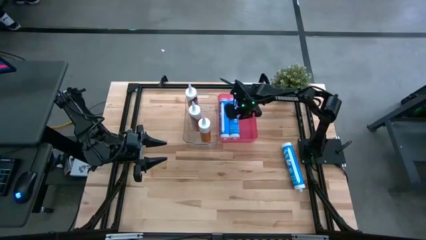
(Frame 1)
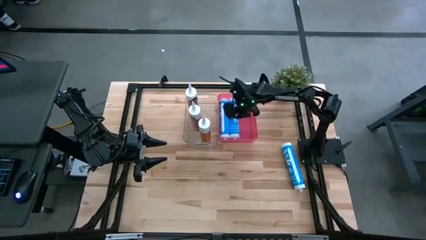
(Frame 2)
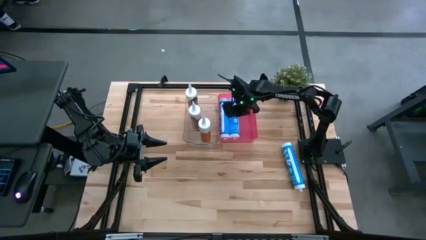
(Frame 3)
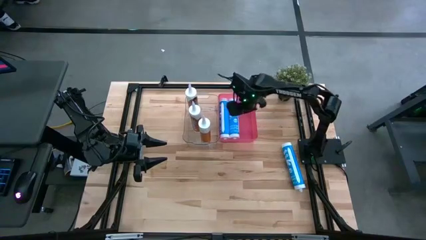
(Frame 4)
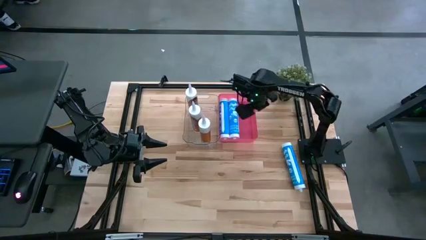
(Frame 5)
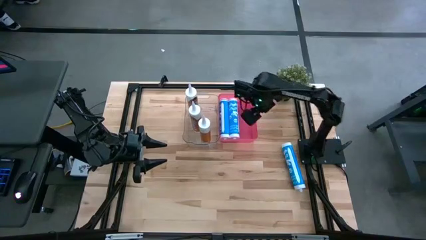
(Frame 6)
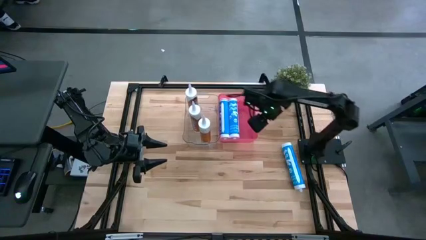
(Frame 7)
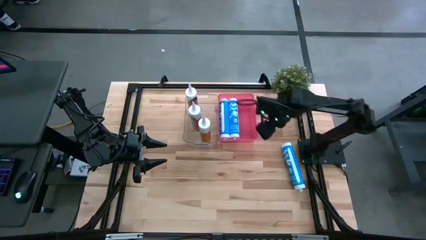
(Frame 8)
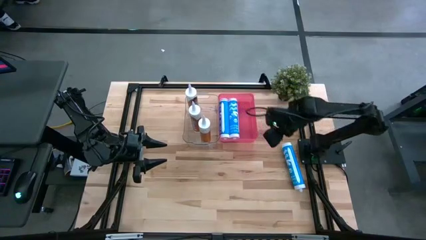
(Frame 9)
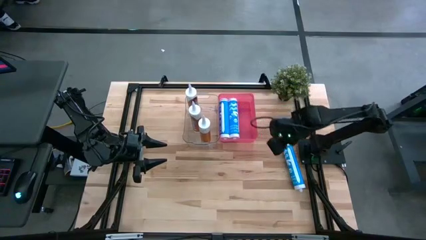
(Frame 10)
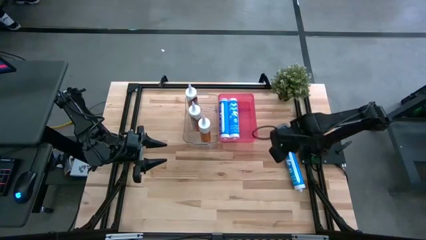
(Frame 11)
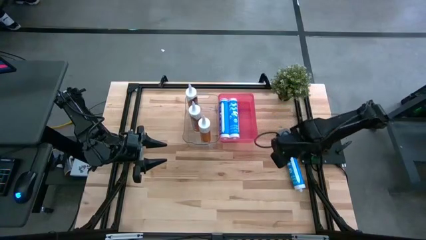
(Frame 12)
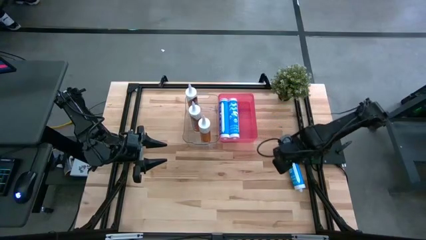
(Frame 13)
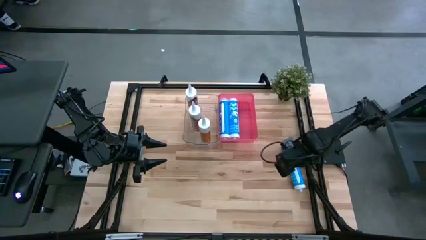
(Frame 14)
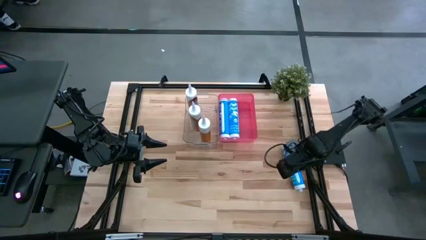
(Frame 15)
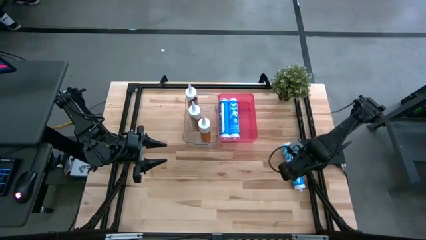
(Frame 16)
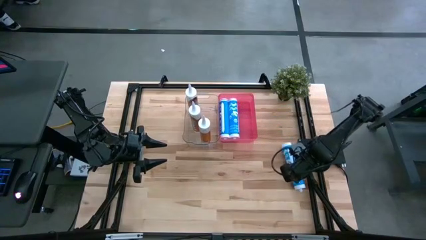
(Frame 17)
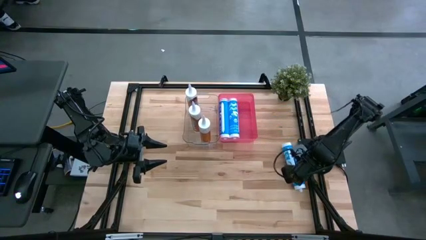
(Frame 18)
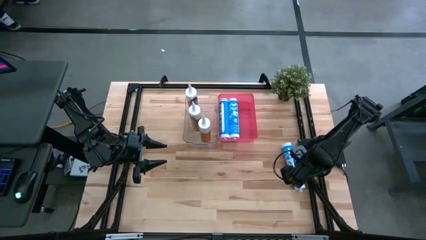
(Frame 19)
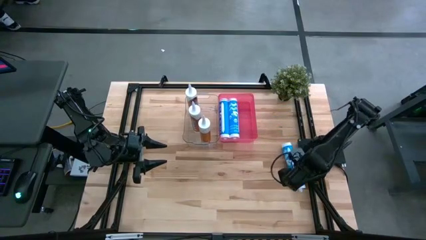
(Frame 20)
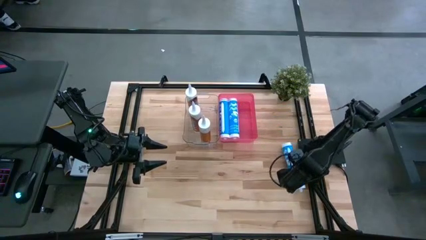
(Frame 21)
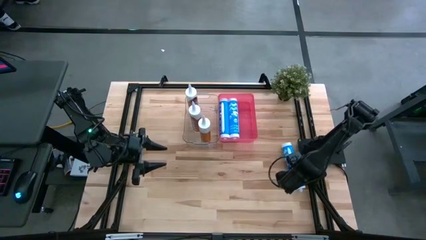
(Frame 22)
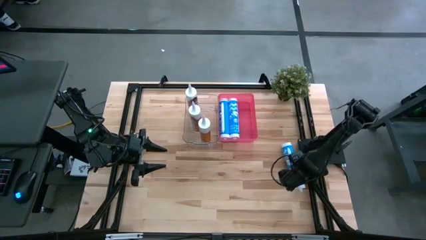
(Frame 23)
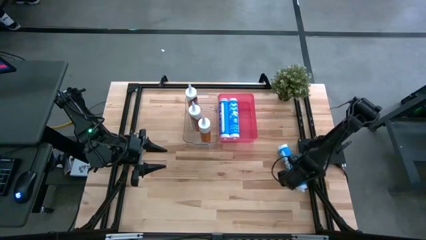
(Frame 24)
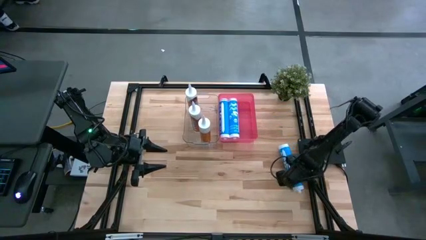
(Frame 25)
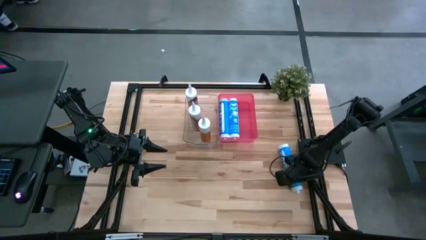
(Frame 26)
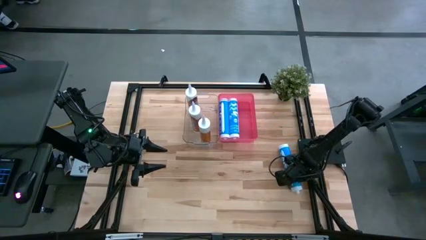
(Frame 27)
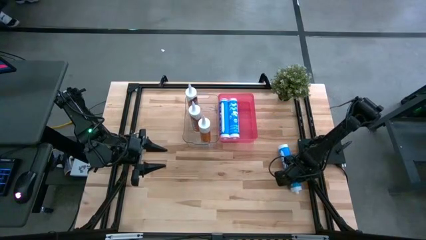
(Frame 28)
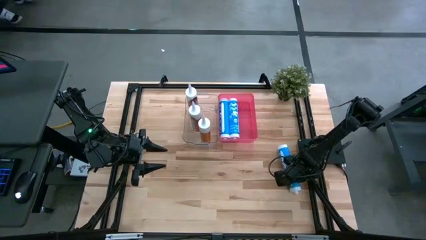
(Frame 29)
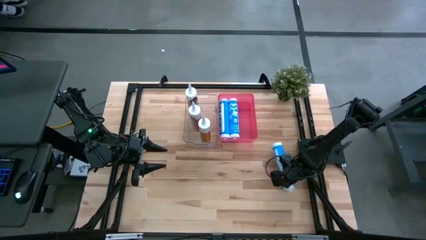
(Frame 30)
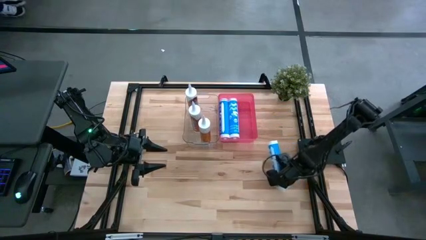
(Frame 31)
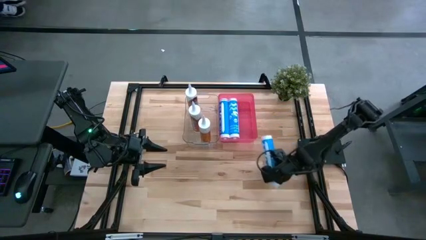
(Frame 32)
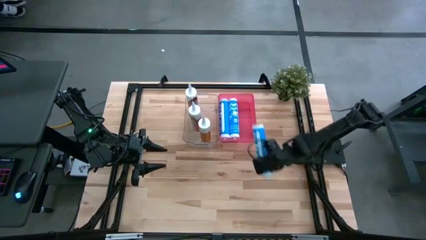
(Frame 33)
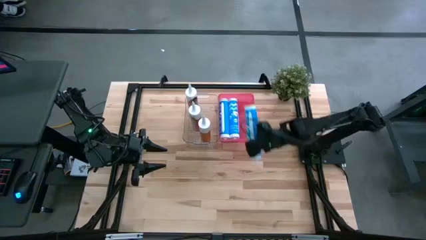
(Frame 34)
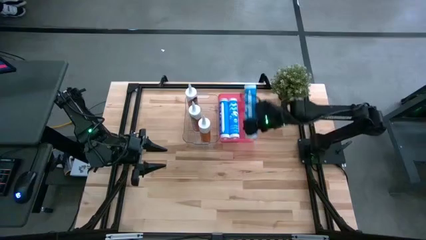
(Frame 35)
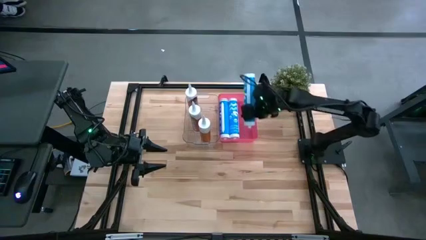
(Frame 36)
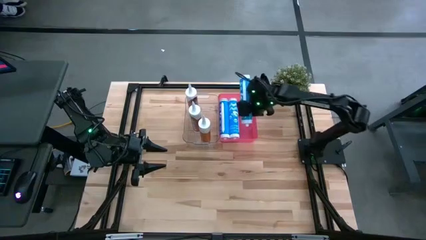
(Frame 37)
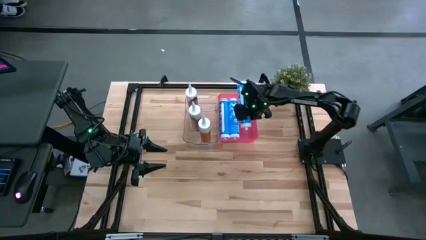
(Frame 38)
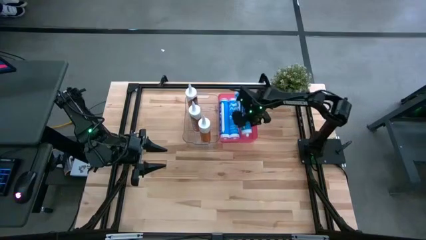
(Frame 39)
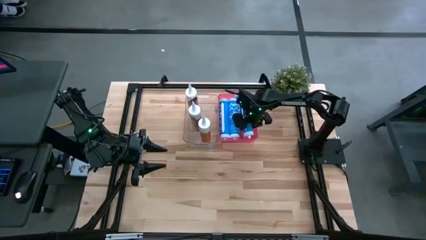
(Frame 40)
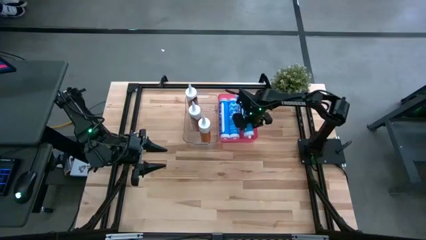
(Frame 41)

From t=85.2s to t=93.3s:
Task: Pick & place silicon tubes, Sealant and Lysol wipes
Put the blue sealant into the red bin

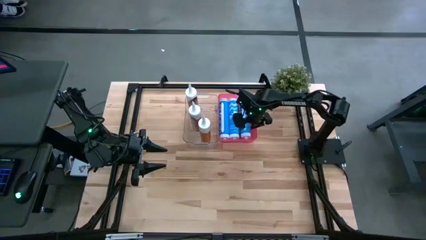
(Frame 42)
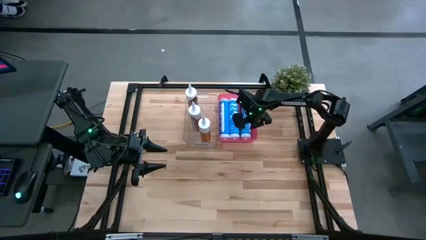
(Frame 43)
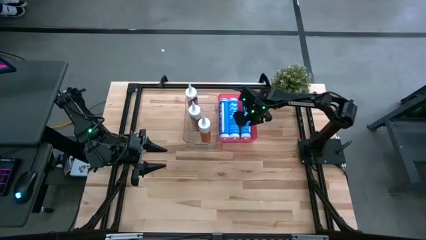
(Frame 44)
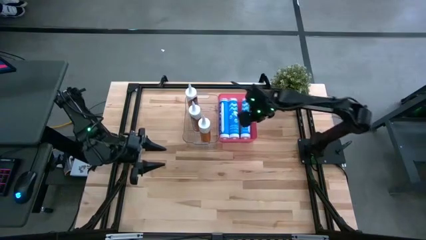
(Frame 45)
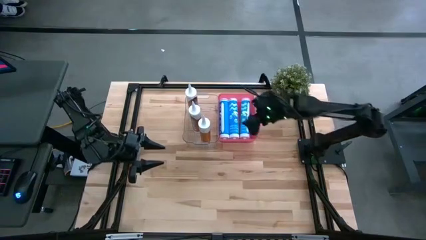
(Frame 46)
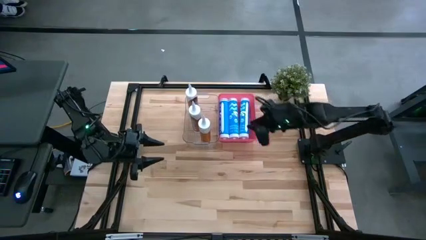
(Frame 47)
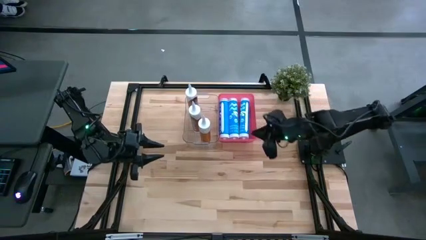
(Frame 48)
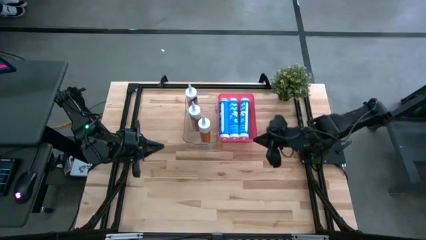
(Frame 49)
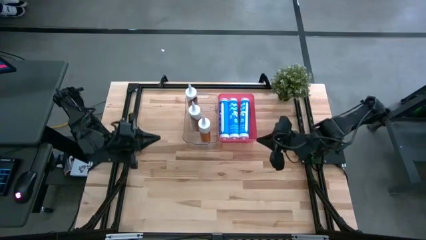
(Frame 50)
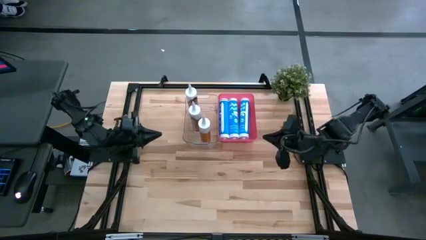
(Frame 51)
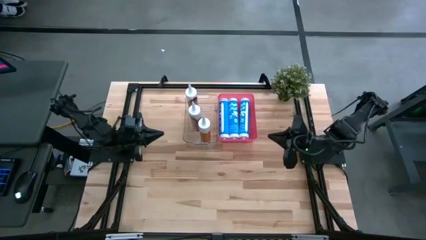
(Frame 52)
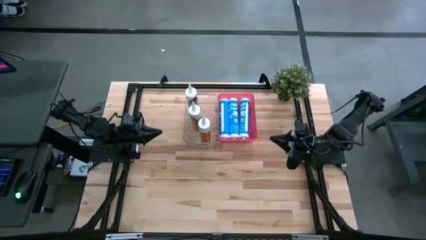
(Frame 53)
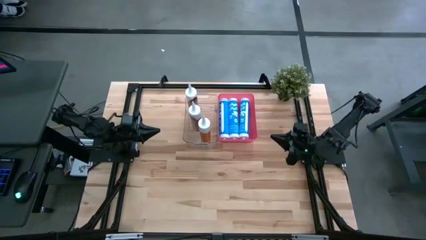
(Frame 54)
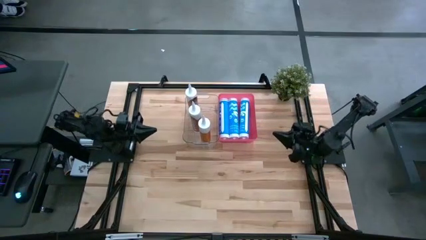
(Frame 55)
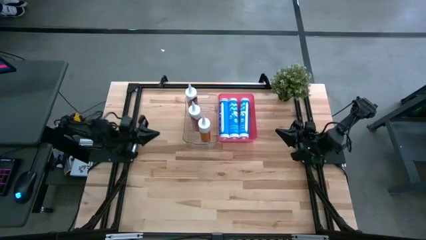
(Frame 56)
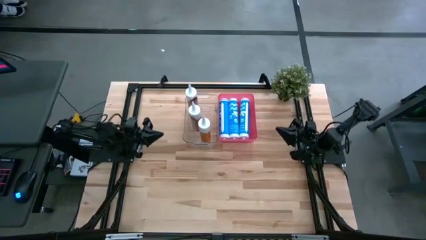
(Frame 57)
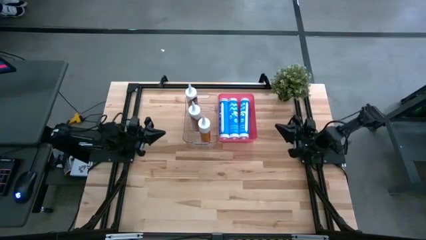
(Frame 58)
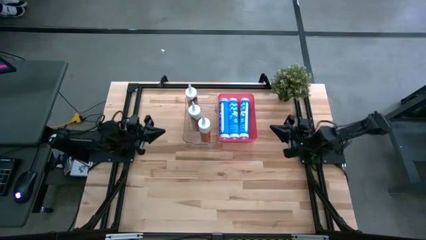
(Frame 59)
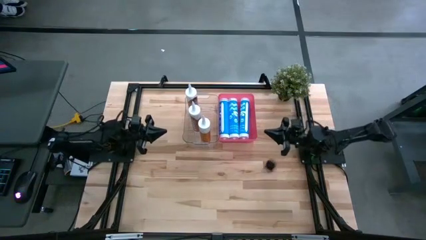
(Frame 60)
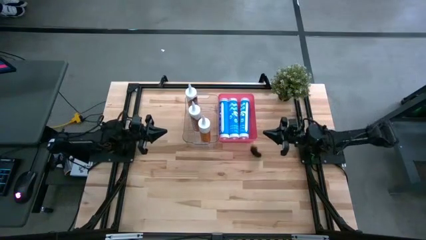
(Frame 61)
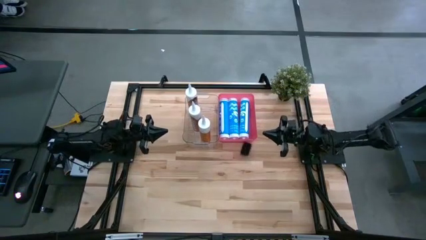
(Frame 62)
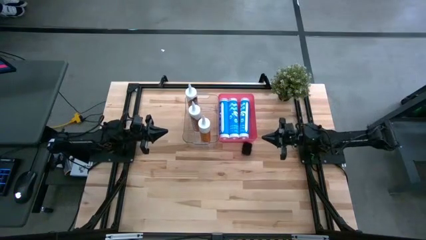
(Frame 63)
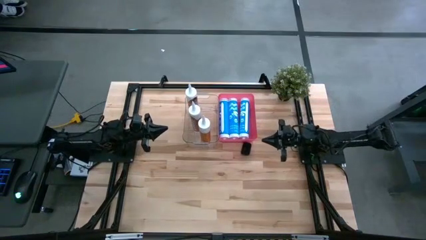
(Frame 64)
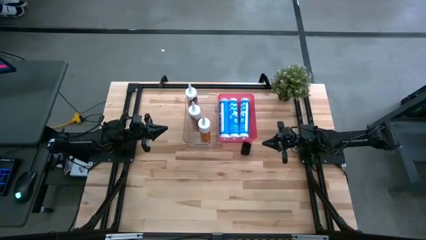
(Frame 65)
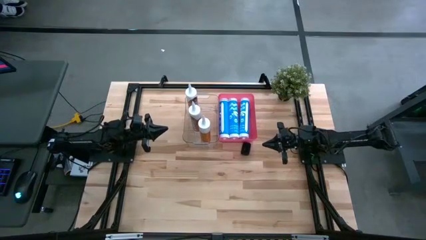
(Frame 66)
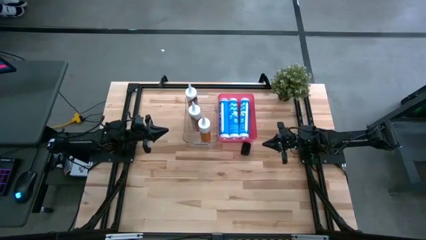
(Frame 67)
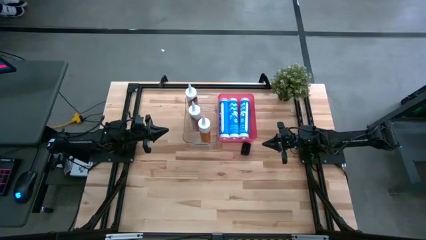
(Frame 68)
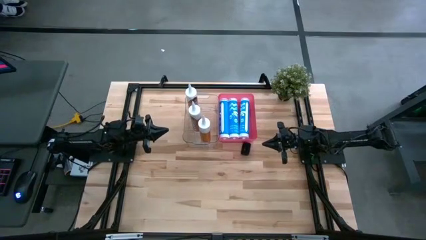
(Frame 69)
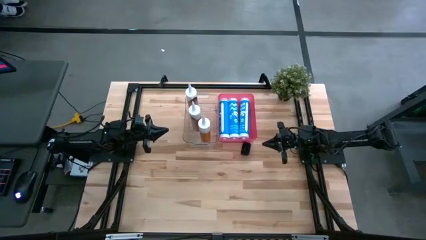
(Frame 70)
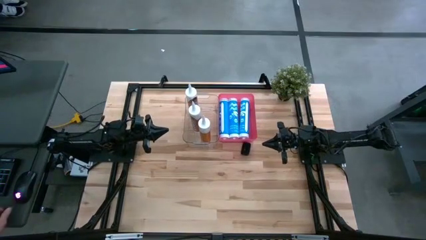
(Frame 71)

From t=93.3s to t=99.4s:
Return to Home Position

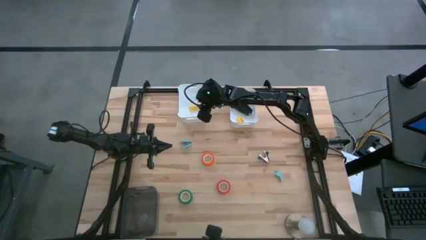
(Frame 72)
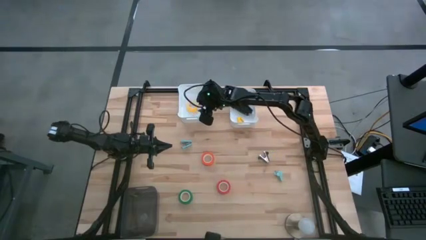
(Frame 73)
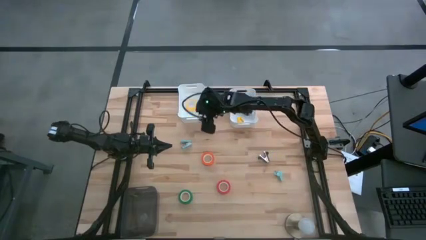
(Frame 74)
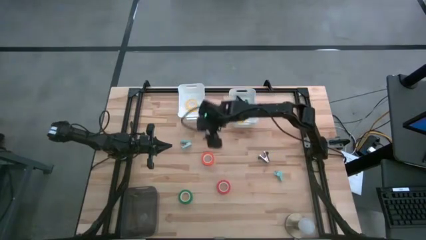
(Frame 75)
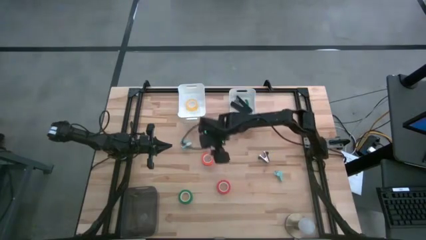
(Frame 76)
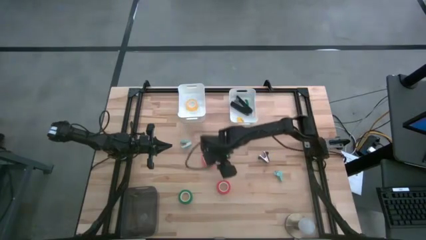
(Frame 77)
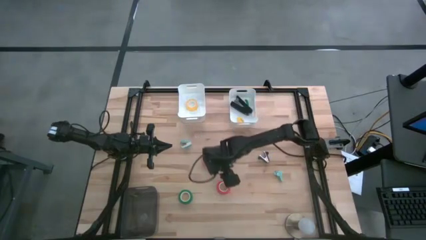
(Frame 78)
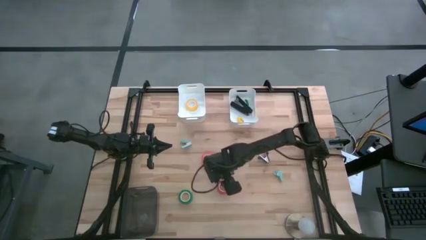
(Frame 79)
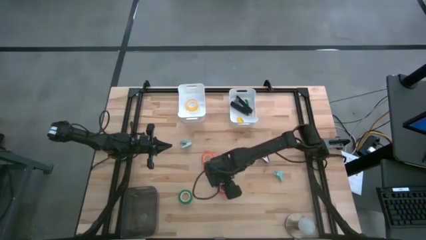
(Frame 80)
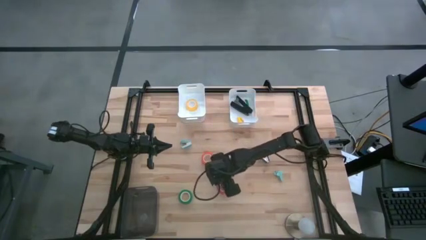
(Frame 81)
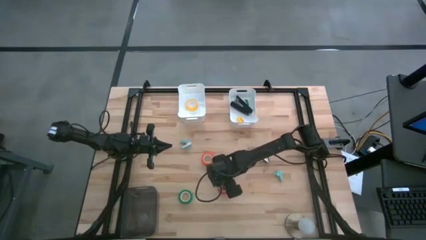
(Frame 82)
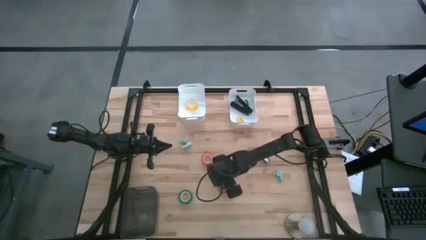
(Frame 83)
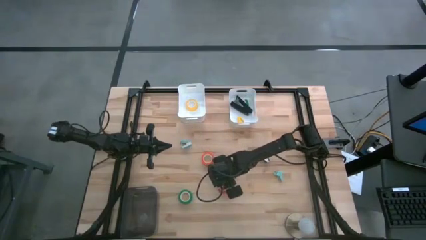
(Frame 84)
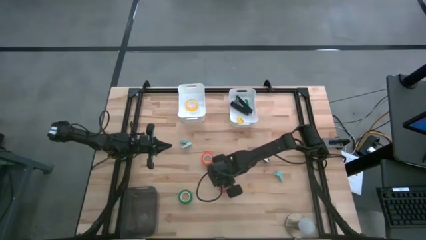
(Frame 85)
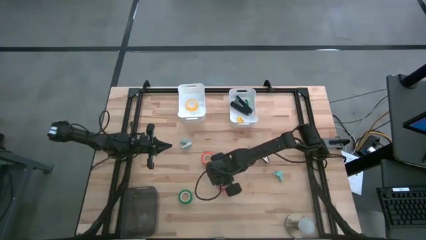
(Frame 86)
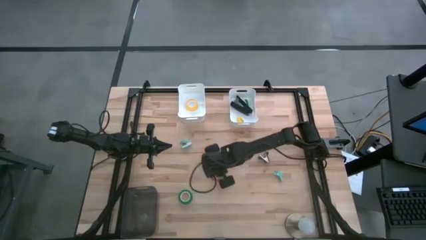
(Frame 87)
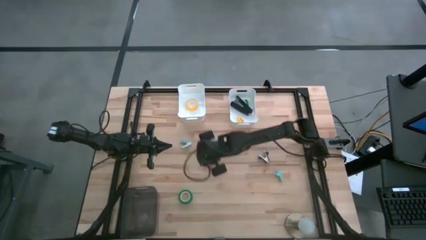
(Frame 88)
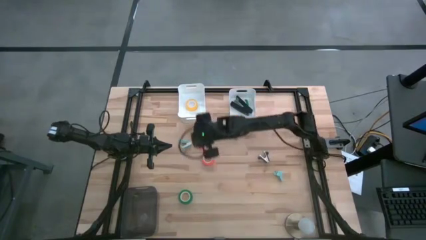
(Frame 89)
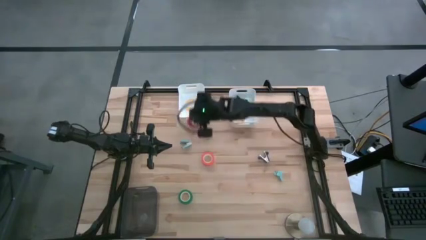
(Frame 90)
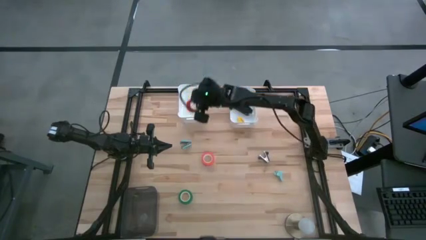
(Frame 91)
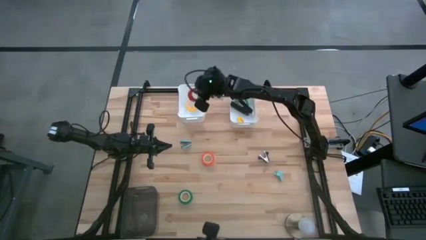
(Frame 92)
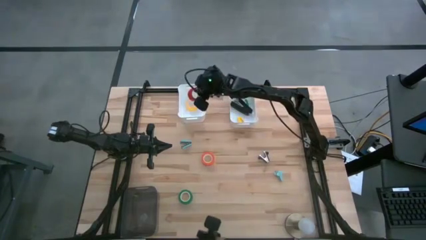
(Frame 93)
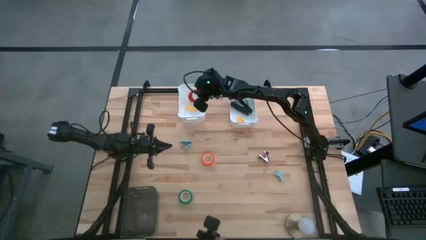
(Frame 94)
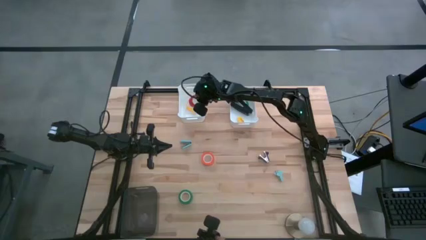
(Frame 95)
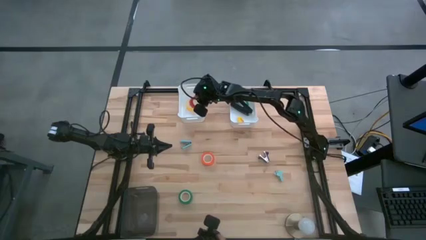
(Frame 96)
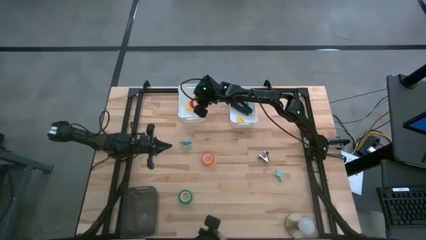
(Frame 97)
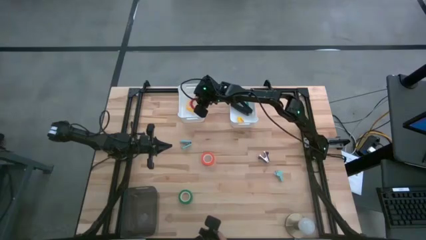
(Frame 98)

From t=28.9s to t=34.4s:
Task: Pick and place Stapler, Stapler remover, tape
Put the red tape into the left white bin
